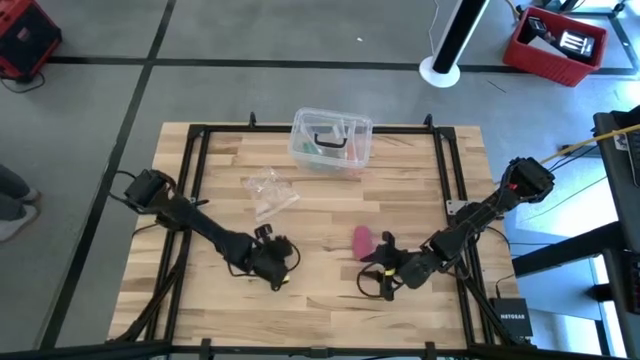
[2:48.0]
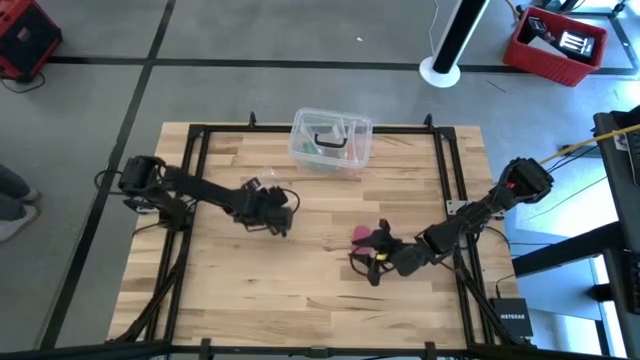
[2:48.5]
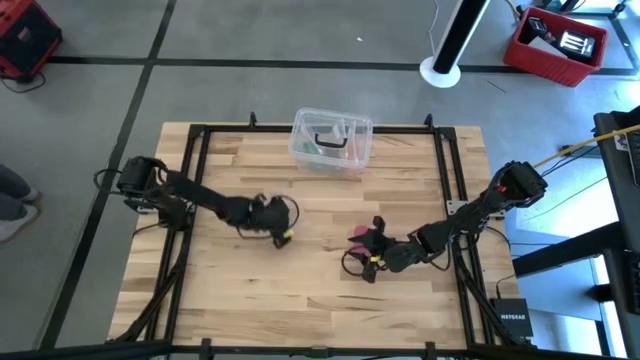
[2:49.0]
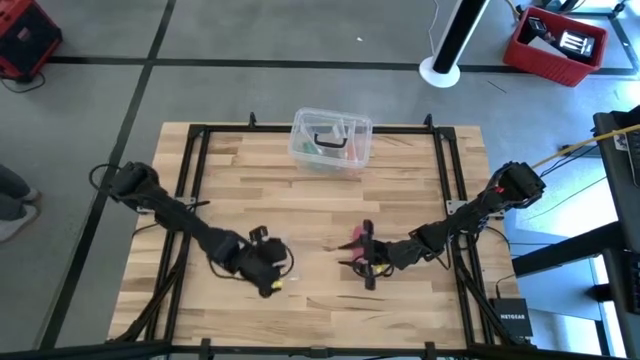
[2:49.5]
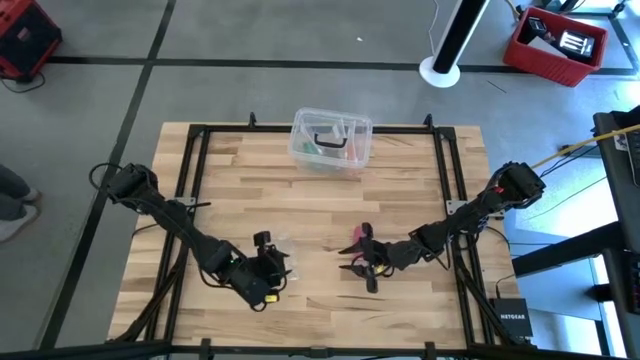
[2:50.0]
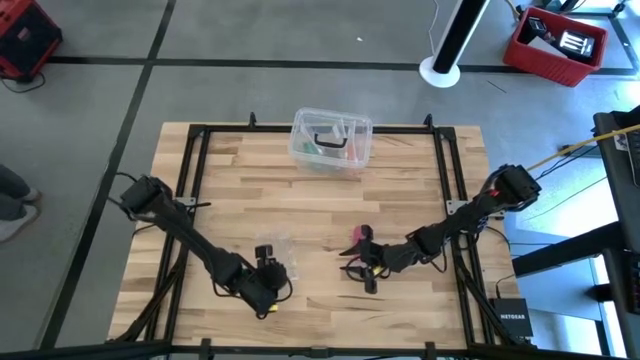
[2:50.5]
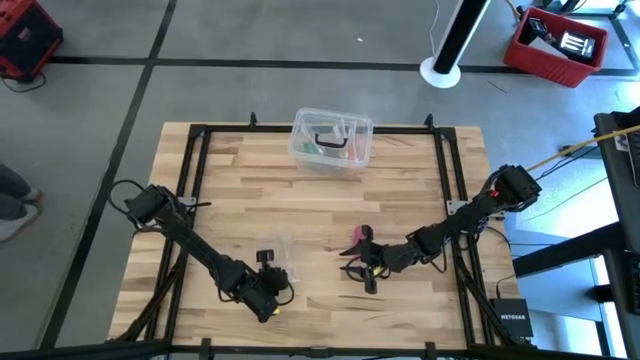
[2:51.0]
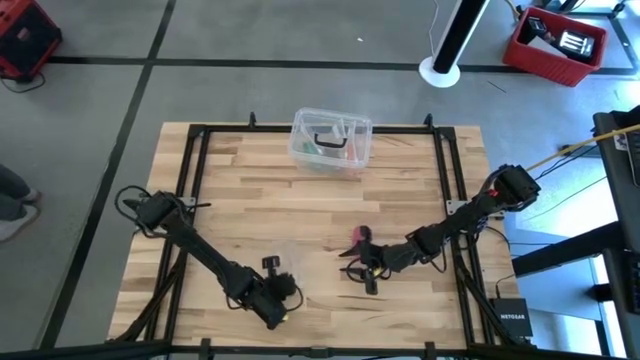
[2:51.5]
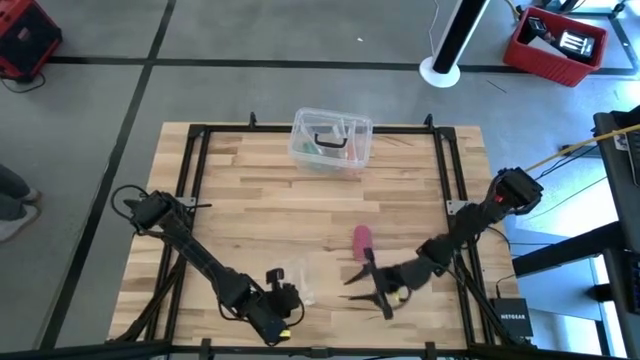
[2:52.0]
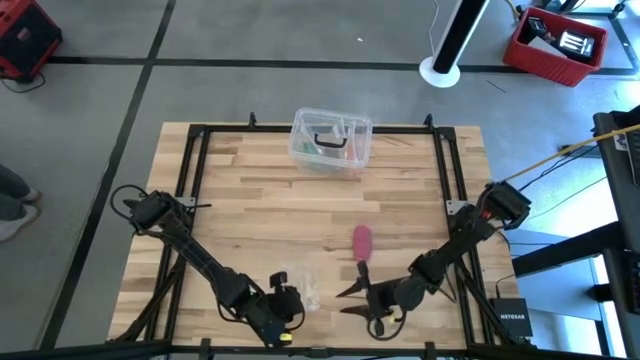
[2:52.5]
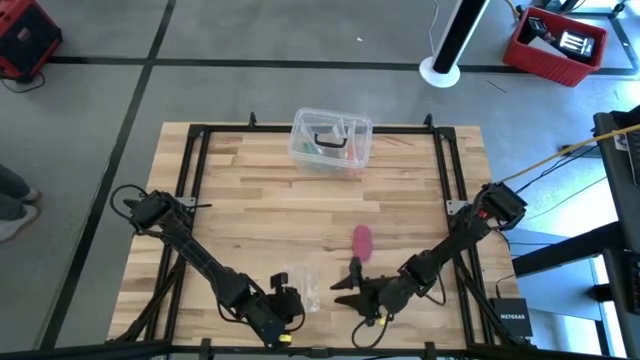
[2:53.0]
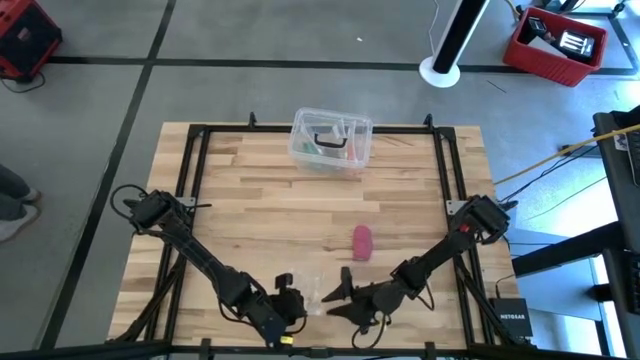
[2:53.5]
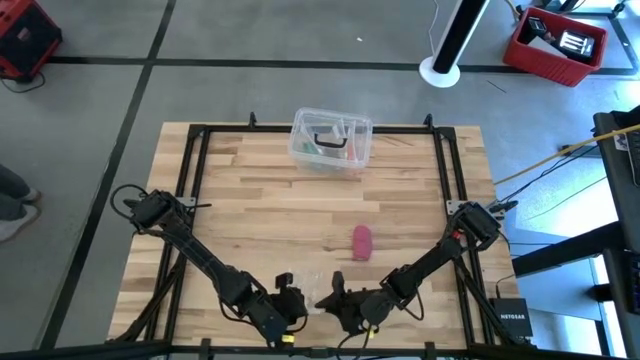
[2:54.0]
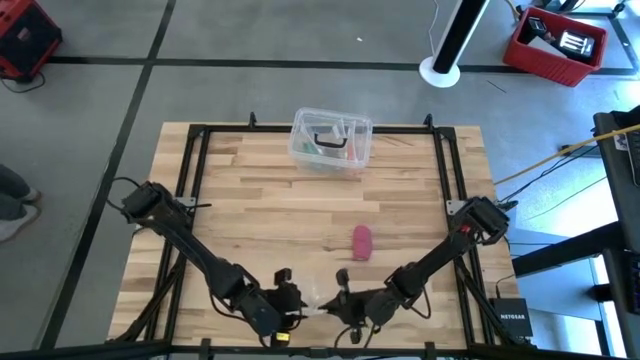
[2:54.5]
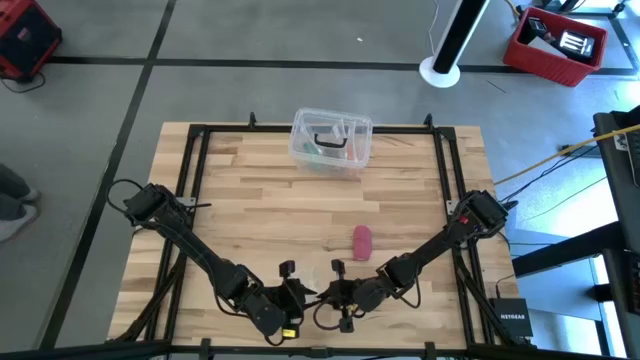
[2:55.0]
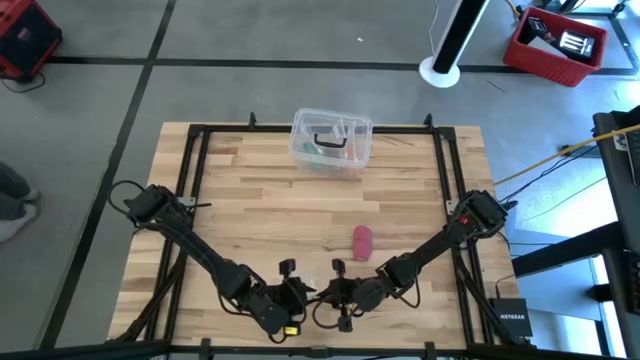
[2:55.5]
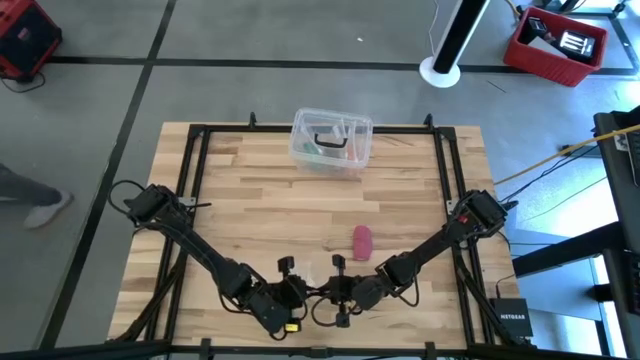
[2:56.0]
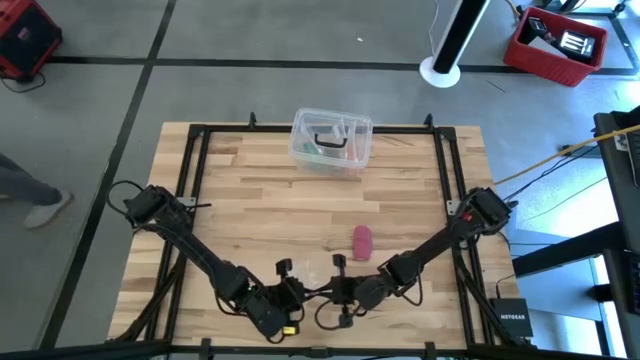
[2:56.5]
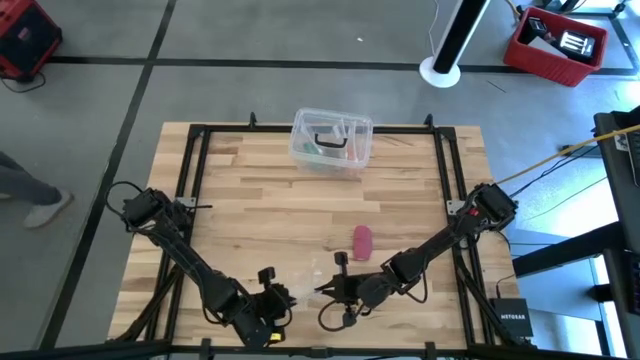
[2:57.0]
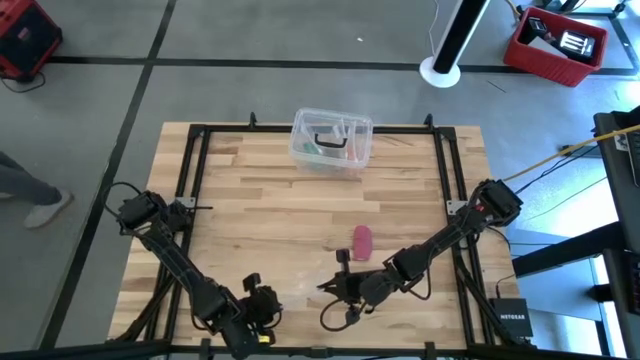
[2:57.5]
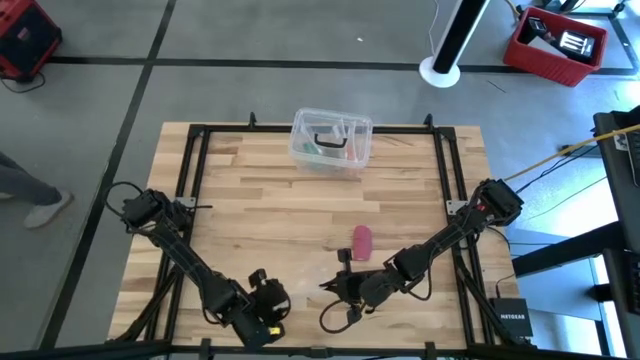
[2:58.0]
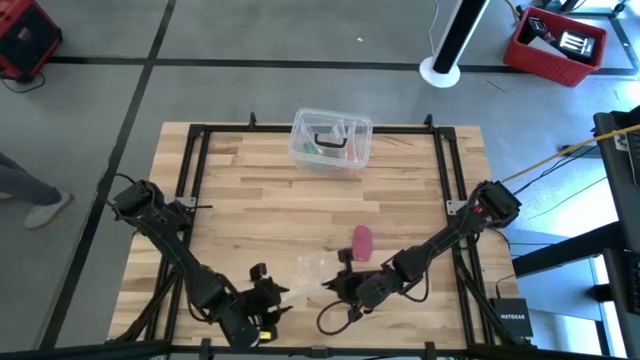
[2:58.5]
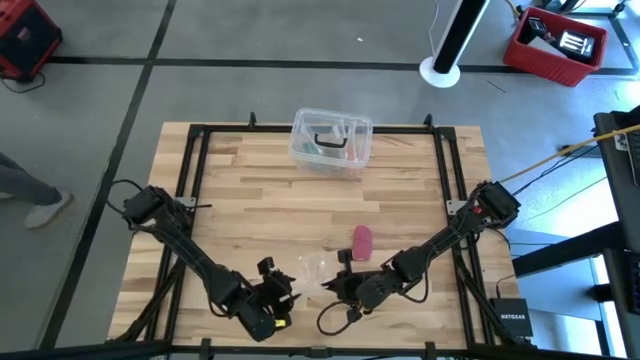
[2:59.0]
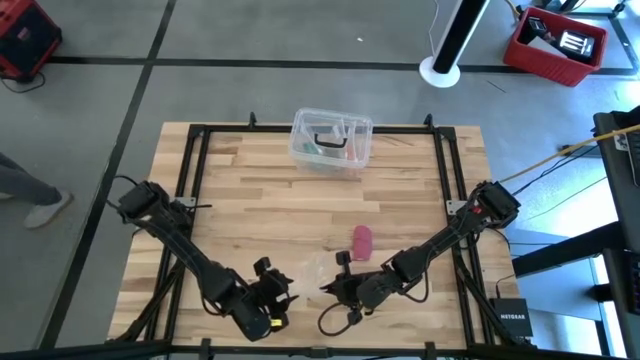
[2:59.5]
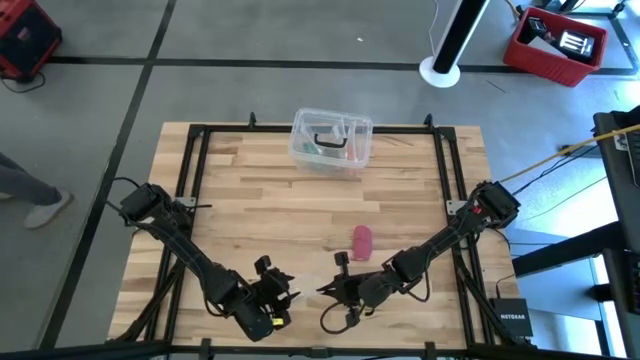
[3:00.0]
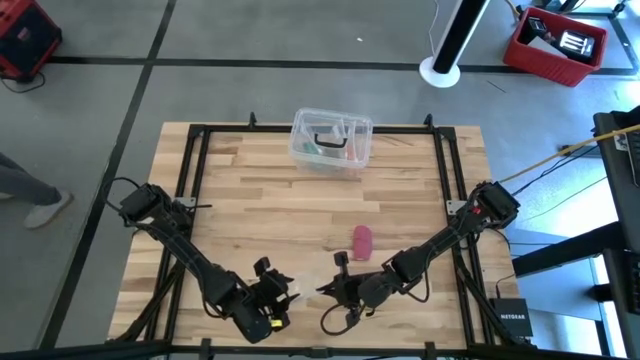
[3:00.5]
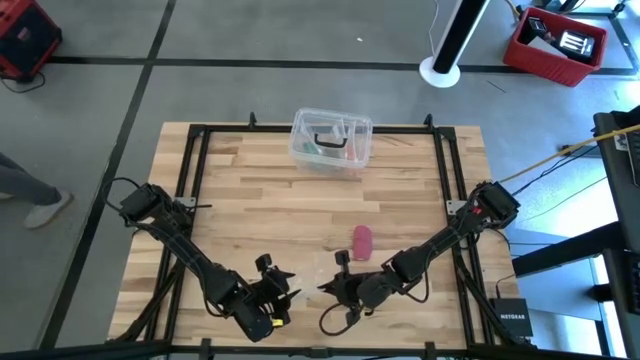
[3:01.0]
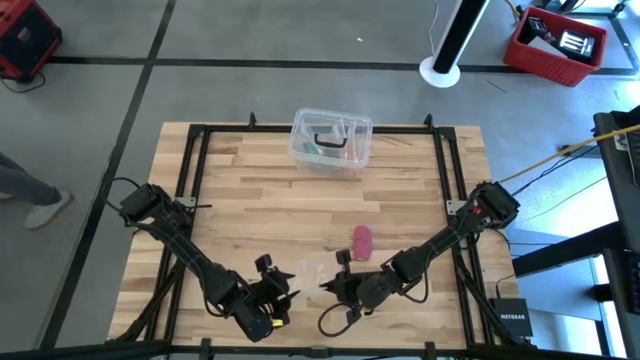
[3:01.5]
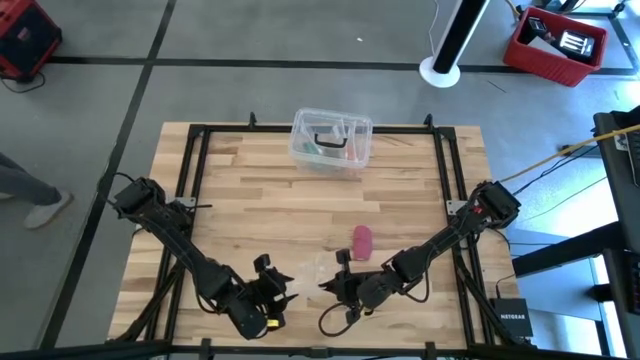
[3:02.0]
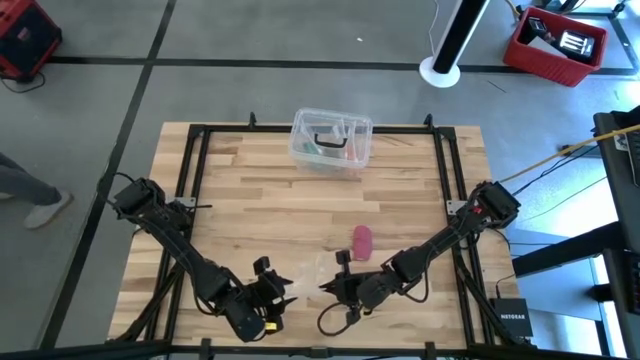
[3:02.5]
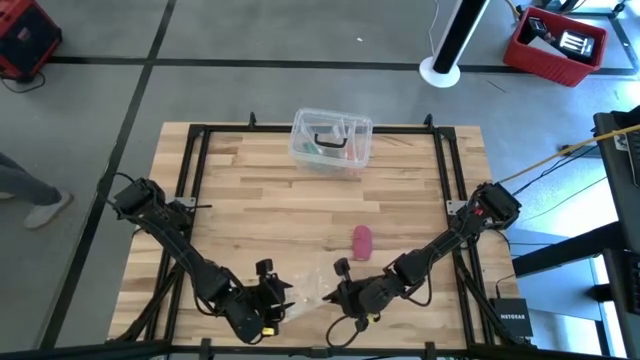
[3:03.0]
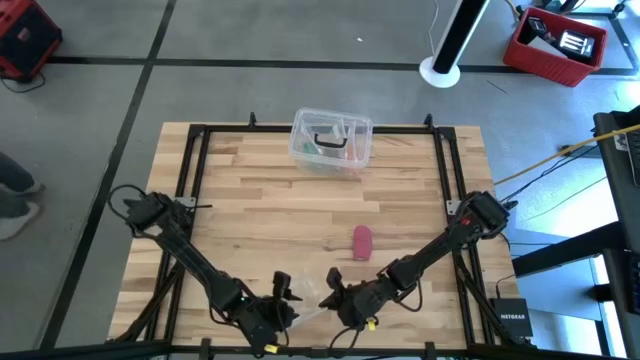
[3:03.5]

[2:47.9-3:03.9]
Task: Roll bandage
Open the transparent zip bag

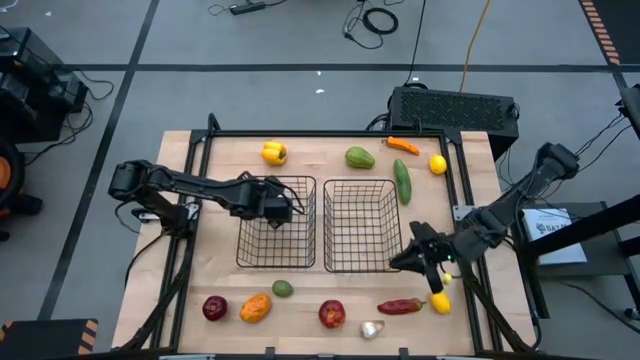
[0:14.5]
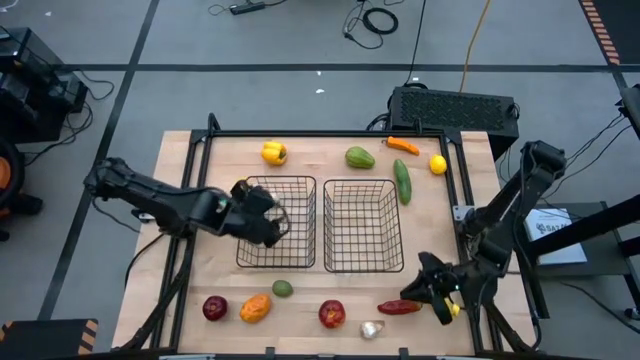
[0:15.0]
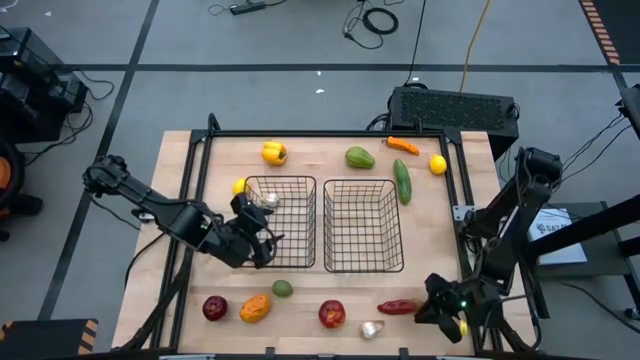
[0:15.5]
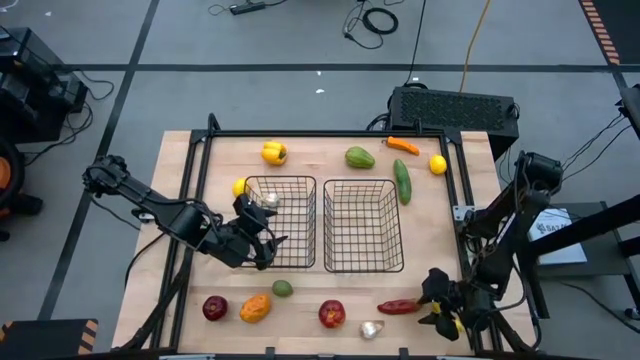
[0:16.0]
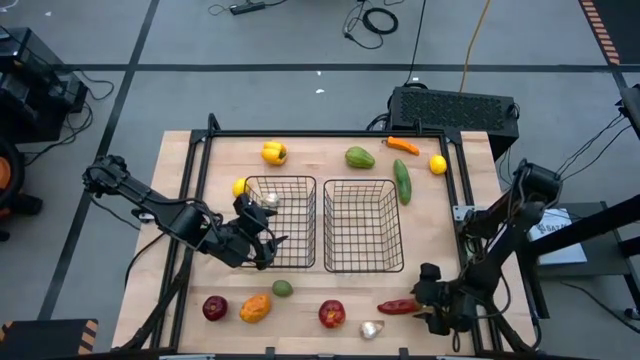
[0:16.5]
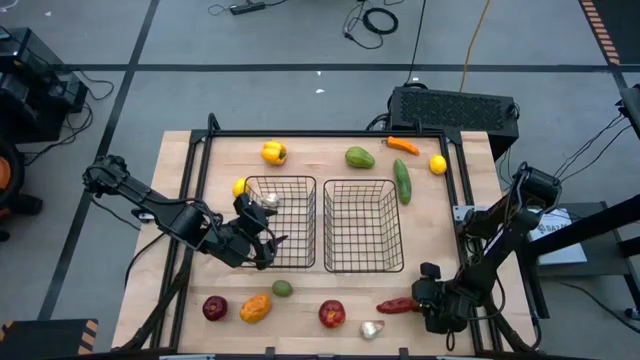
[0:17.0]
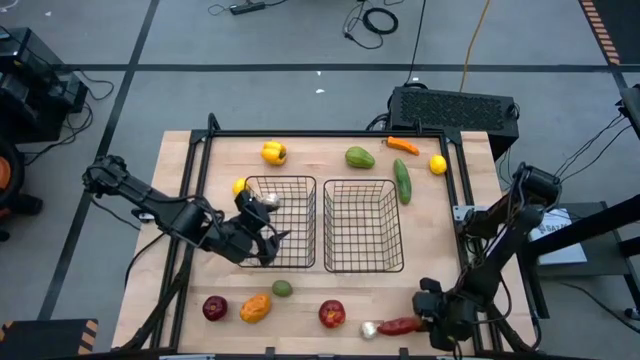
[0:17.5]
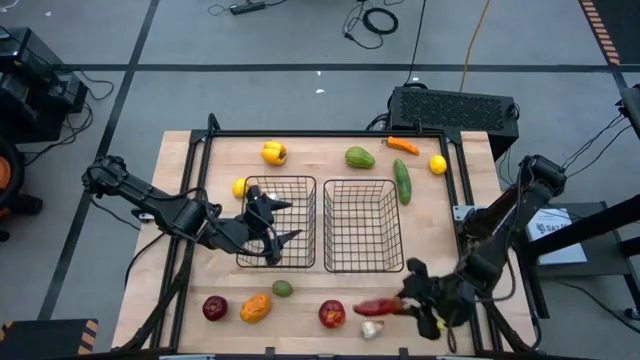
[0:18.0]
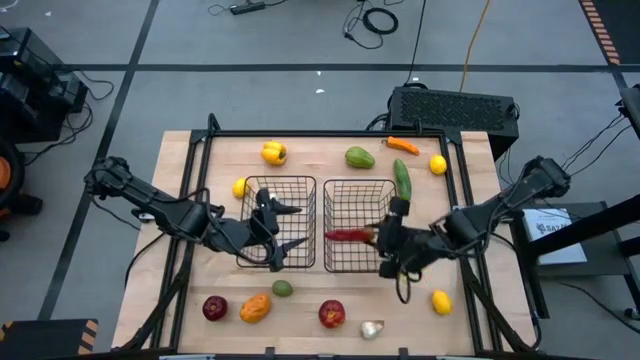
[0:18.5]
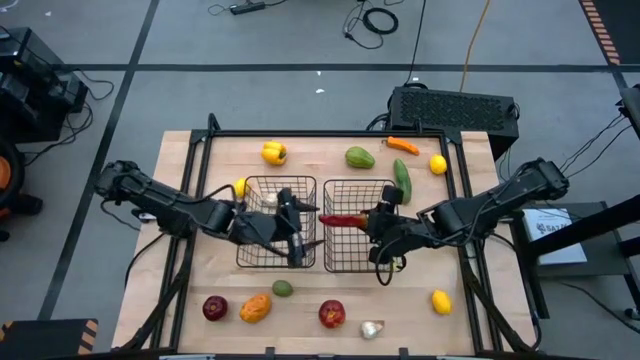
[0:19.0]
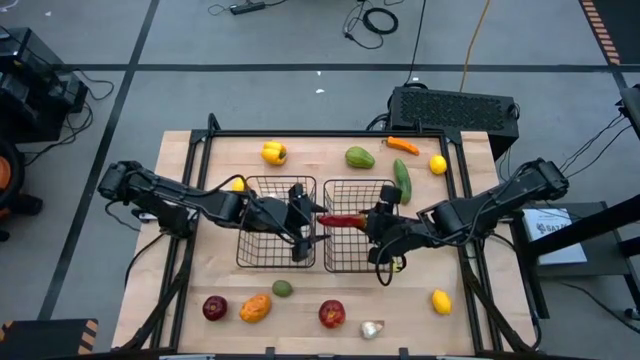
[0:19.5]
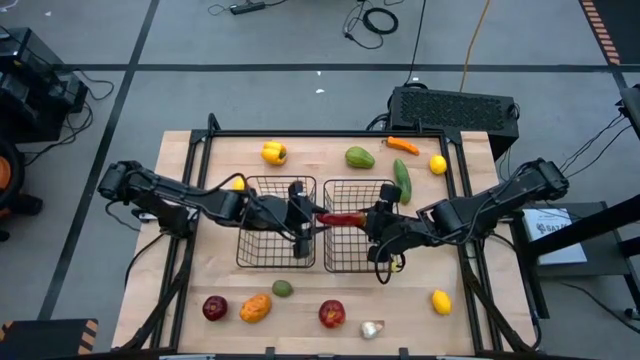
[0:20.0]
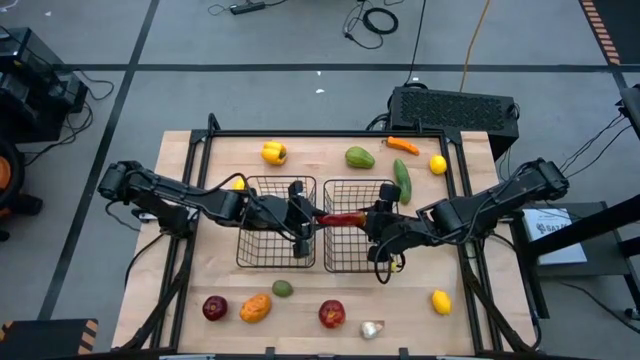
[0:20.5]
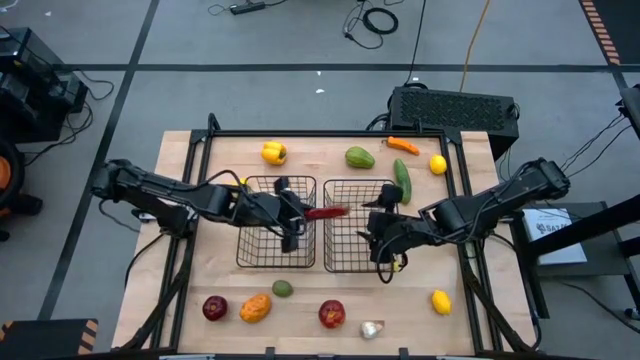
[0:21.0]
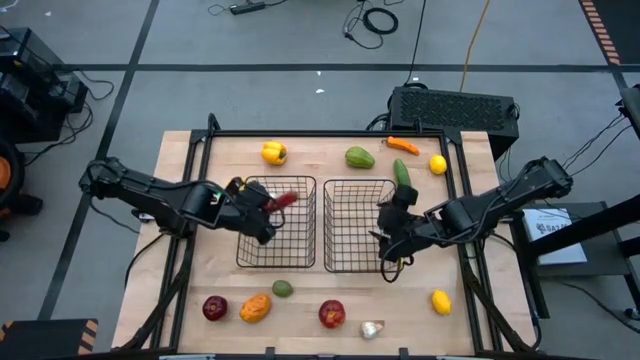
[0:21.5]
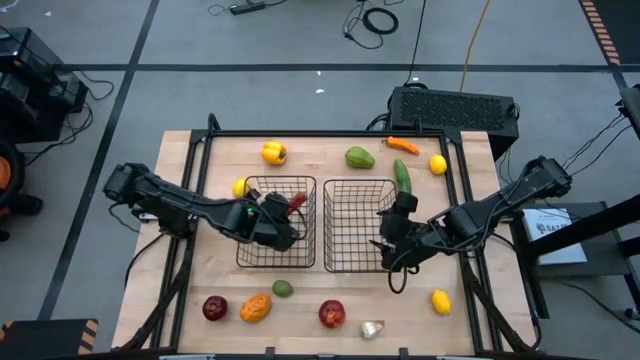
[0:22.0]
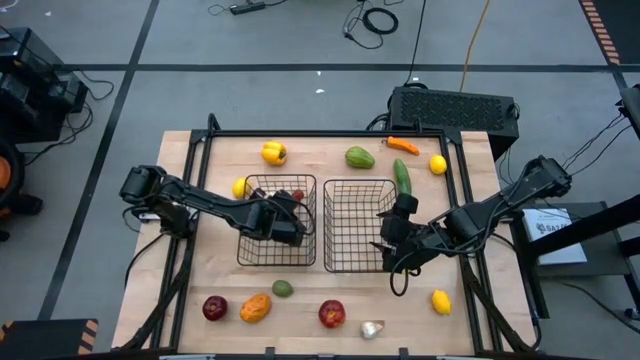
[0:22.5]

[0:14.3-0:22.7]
Task: Sort produce into baskets
Put the red chili pepper into the left black wire basket
